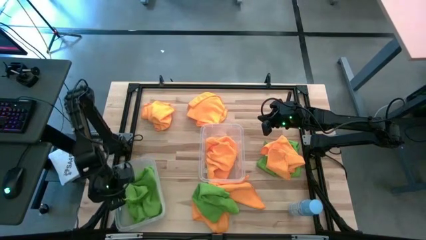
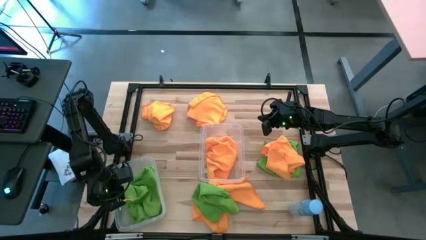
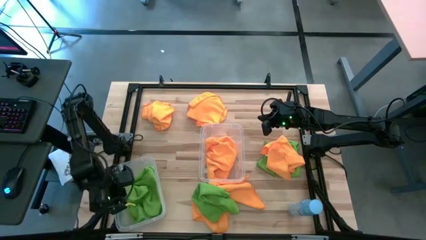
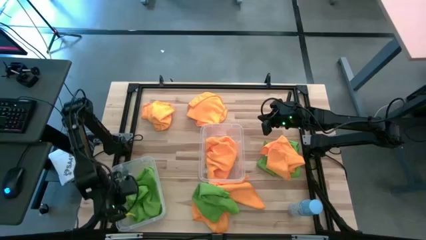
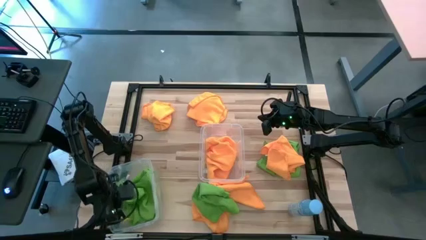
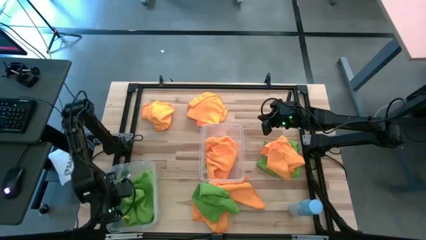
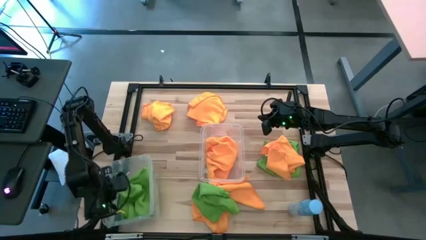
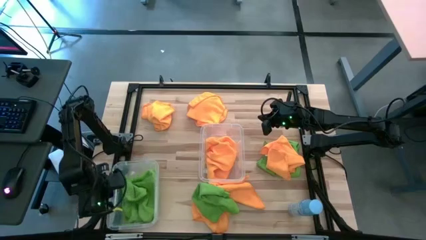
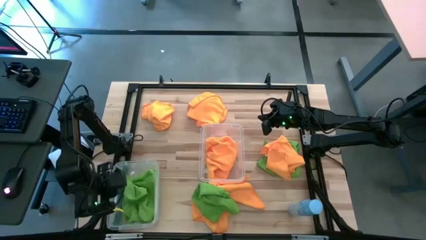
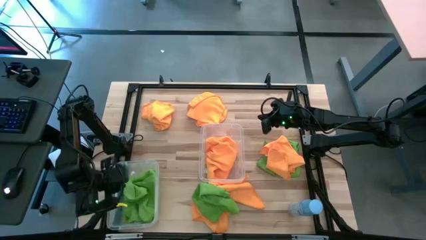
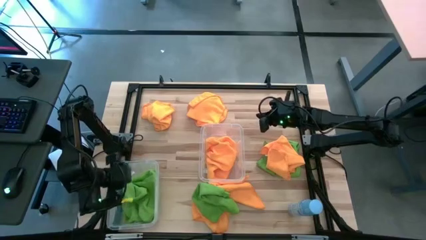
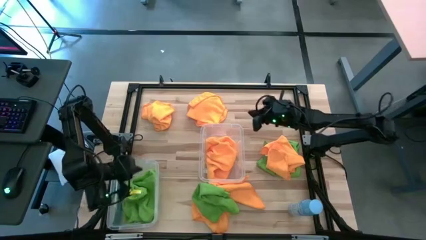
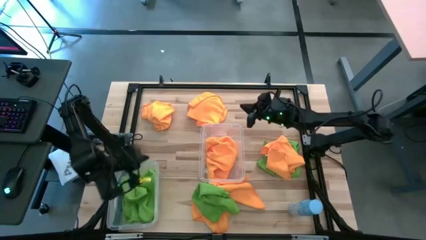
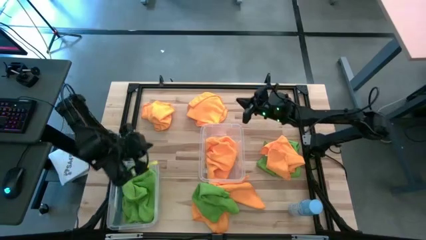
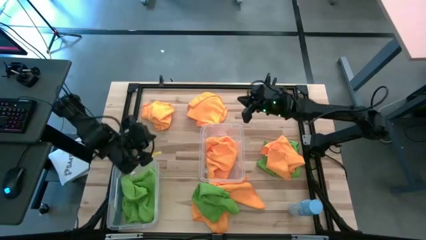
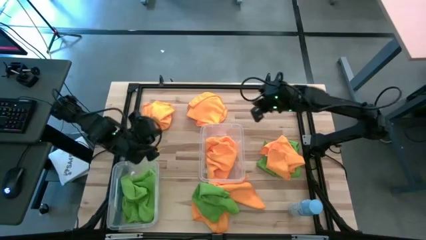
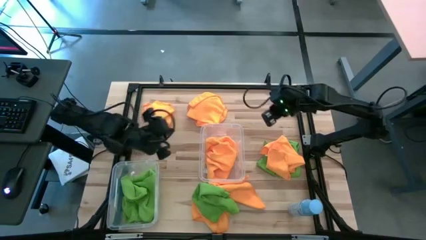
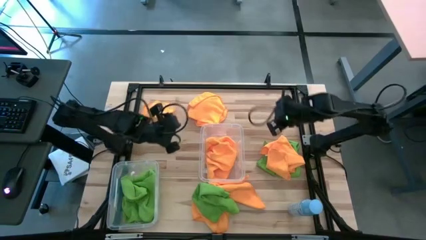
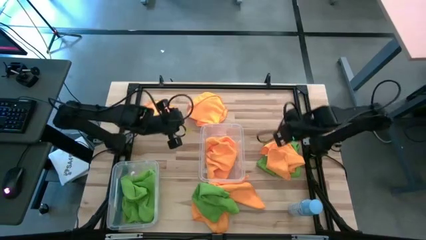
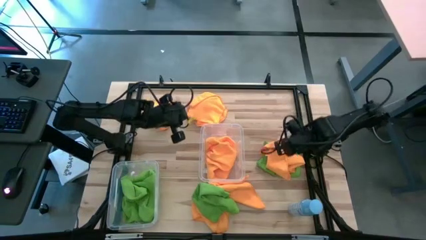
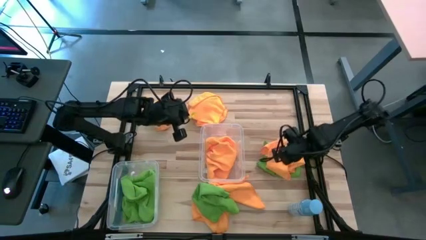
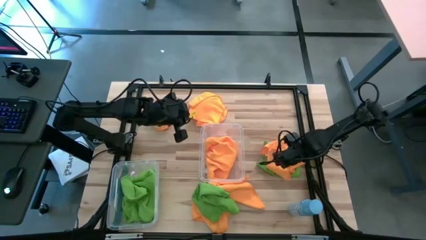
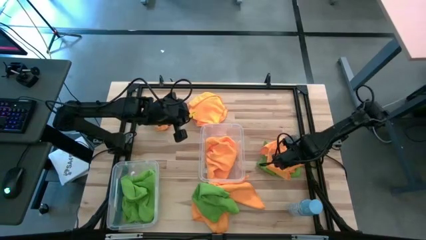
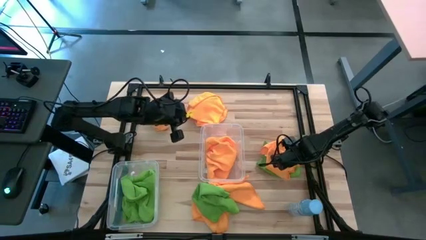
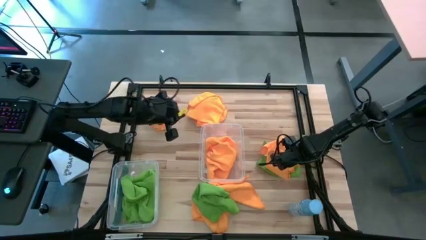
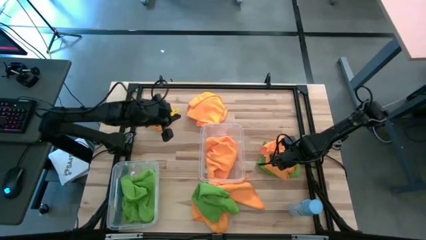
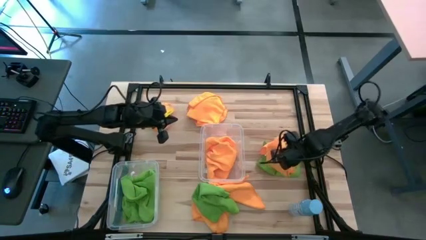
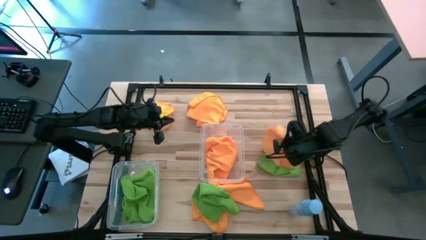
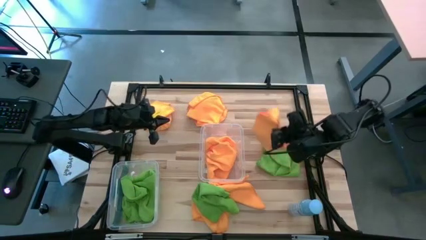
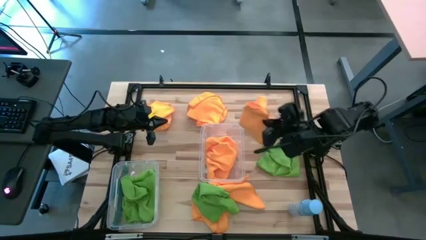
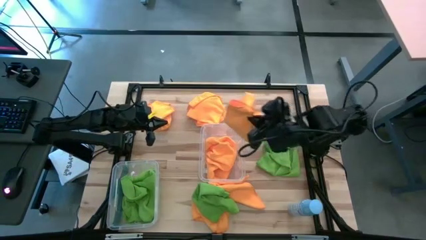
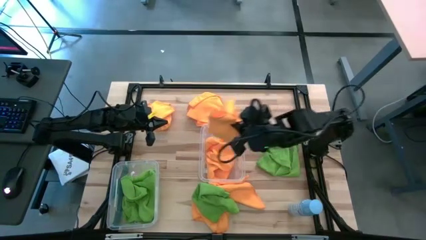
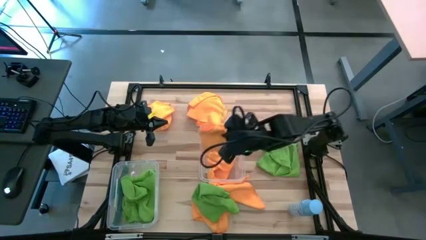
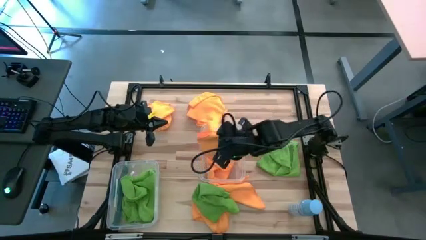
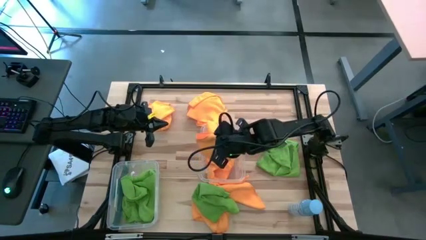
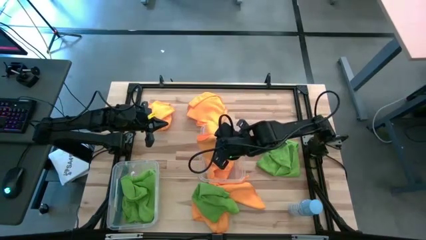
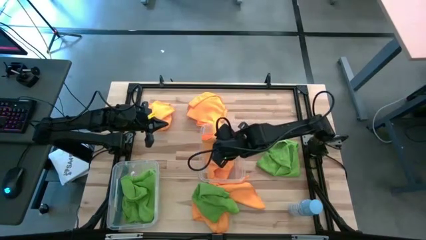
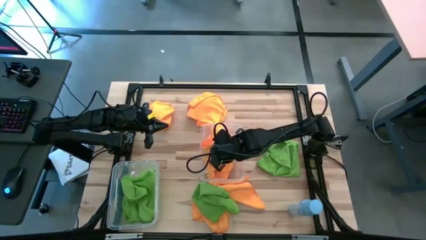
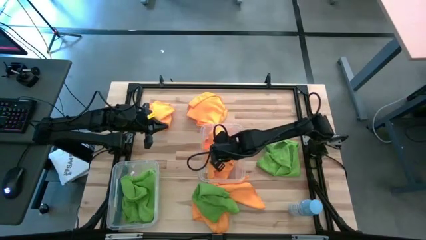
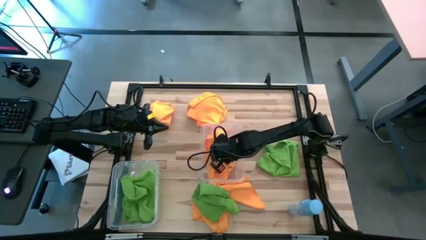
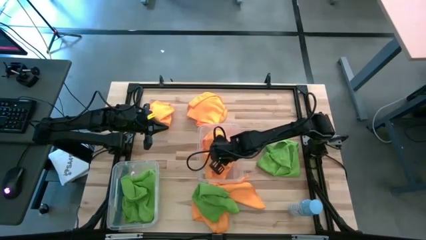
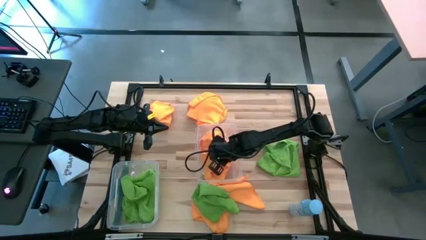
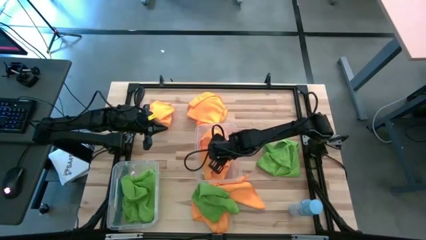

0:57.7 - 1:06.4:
Task: Sort microfiber towel by color & place in baskets
Put the yellow microfiber towel into the right transparent bin

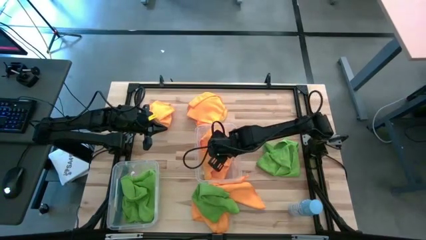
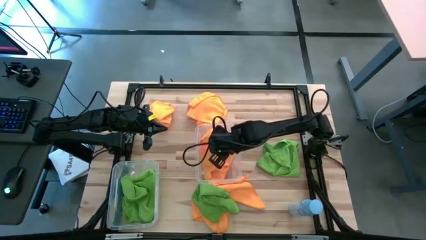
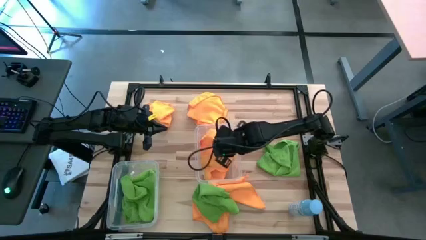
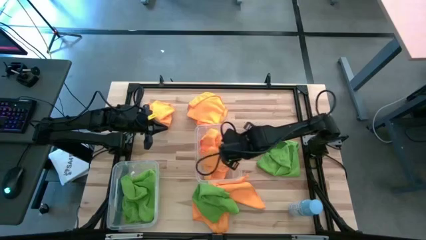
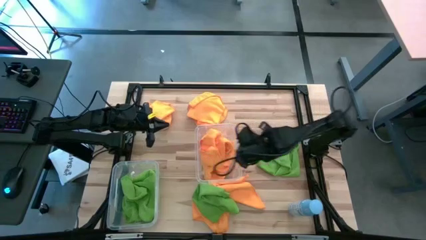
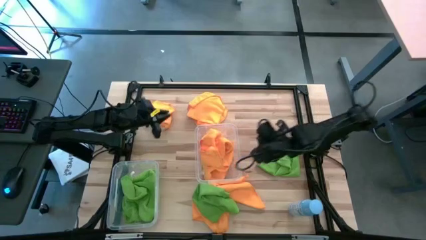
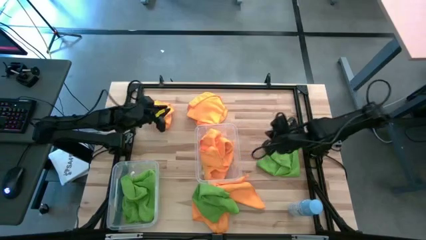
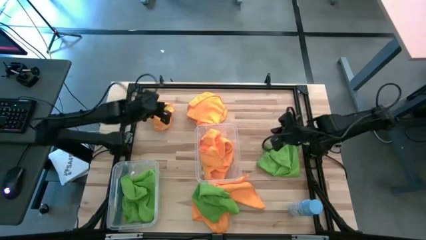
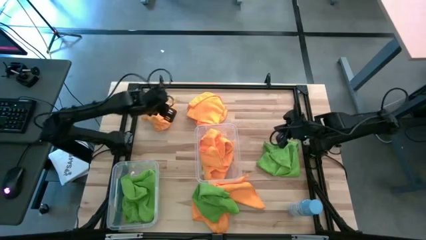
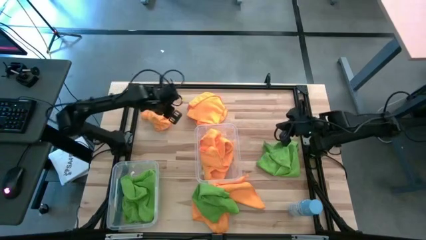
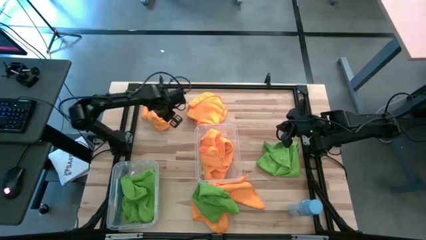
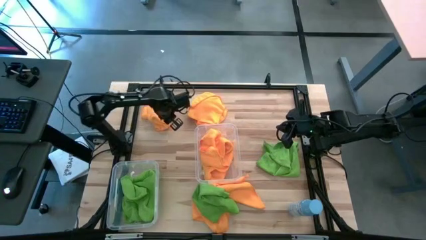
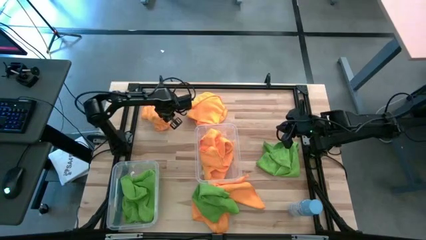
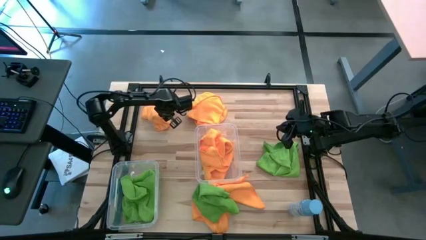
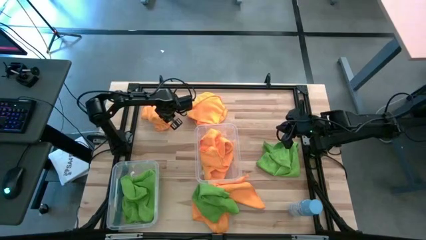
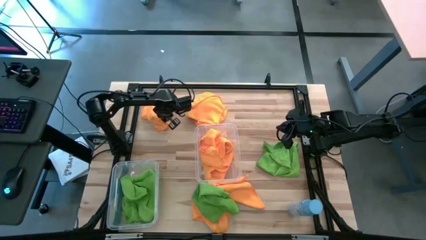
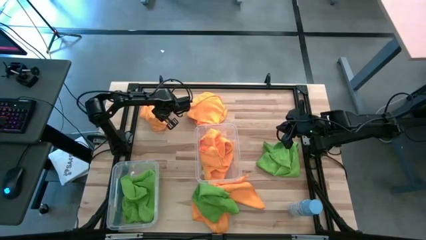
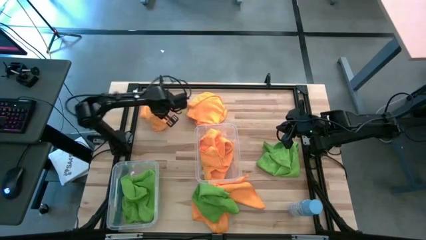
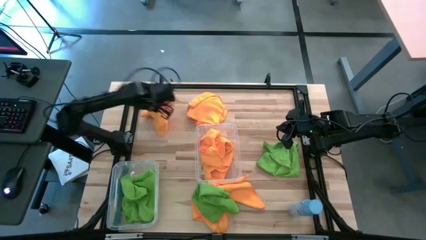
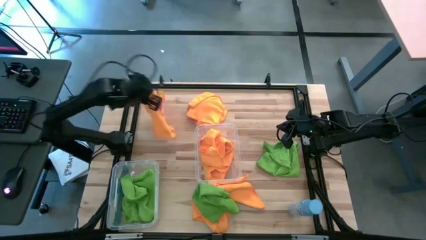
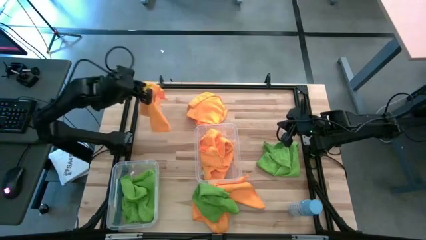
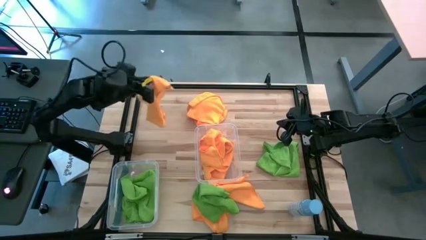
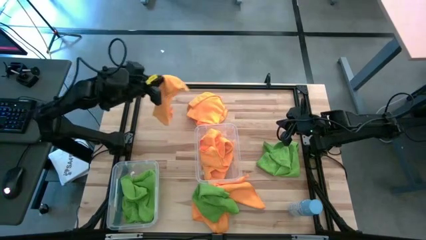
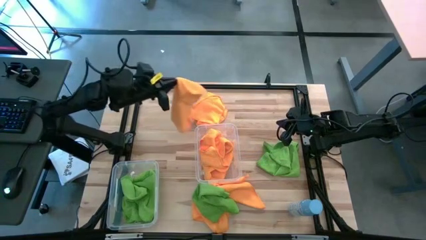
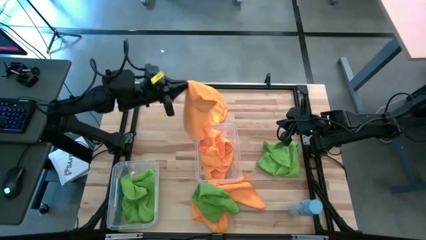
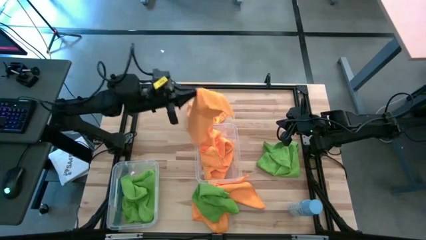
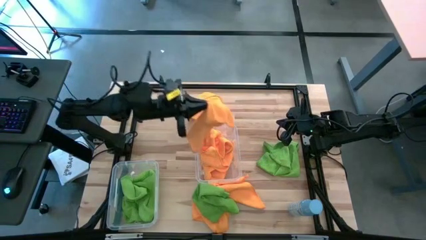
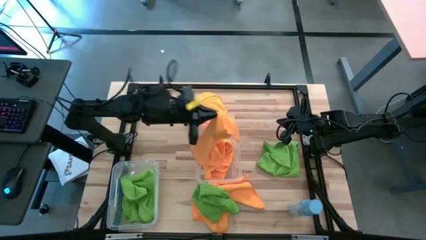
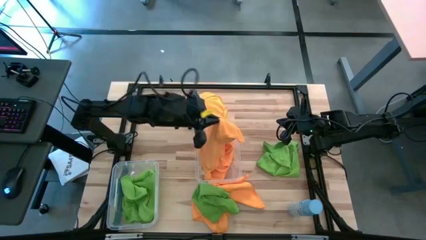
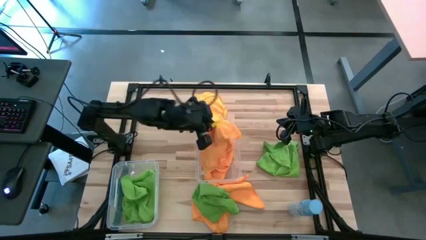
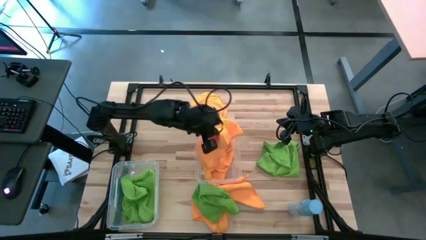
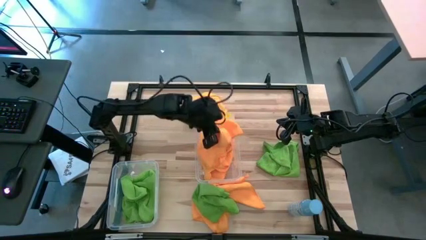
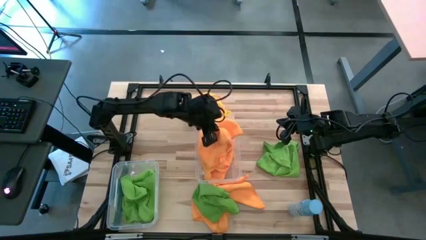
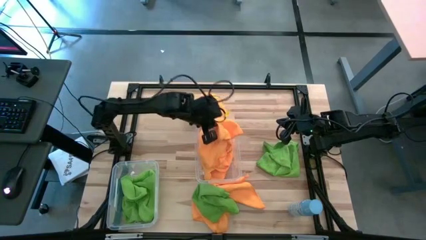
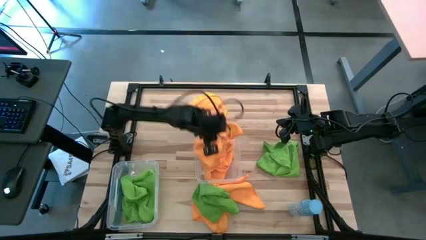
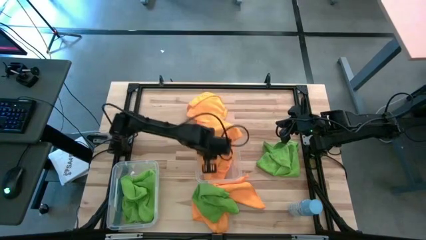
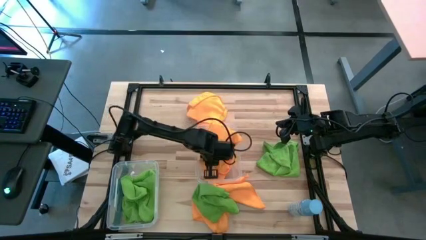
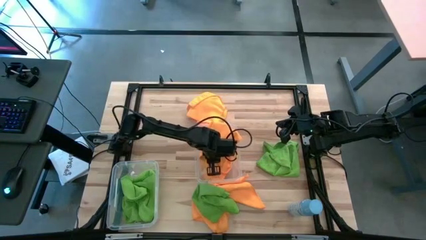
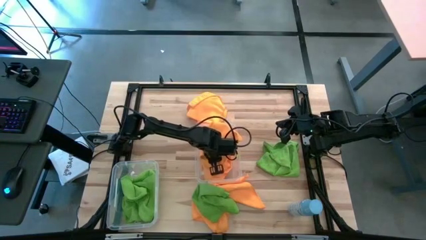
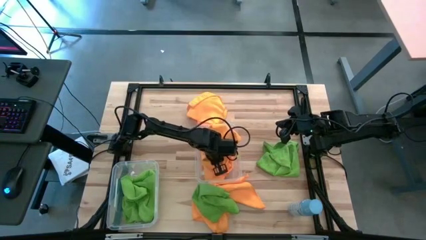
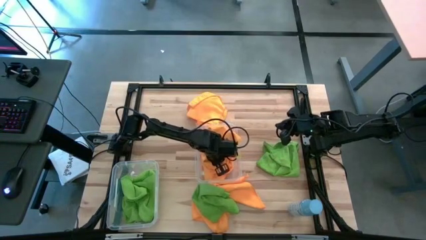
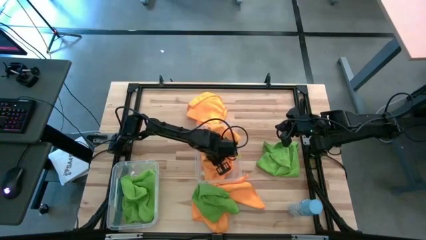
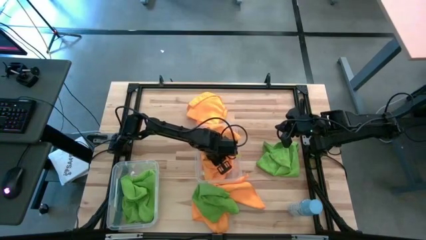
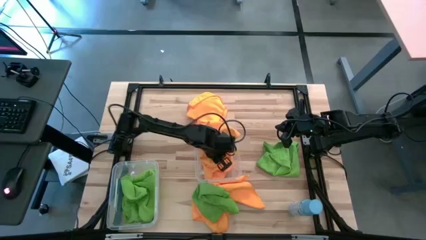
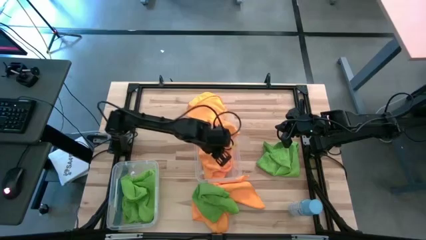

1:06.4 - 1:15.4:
Put the yellow microfiber towel into the right transparent bin
